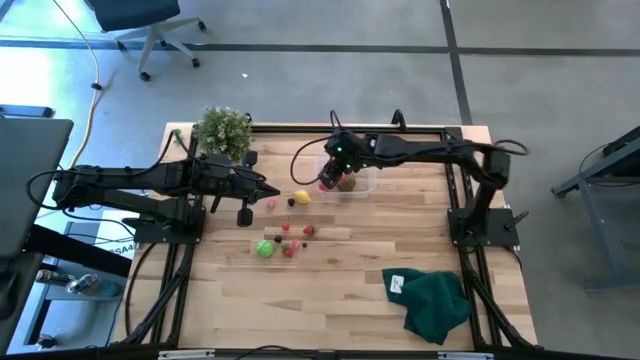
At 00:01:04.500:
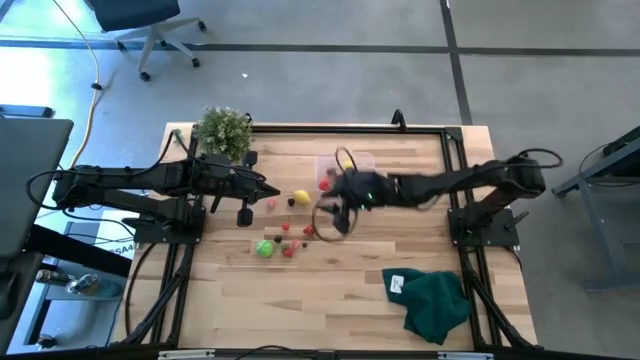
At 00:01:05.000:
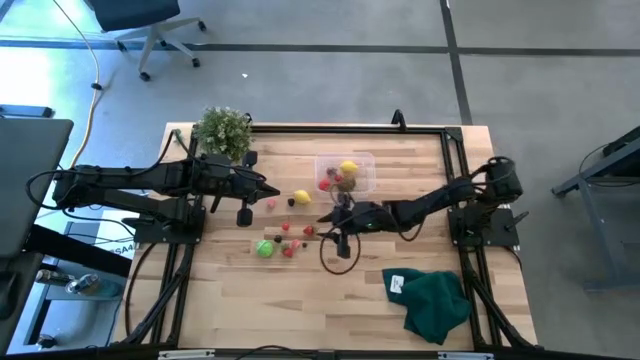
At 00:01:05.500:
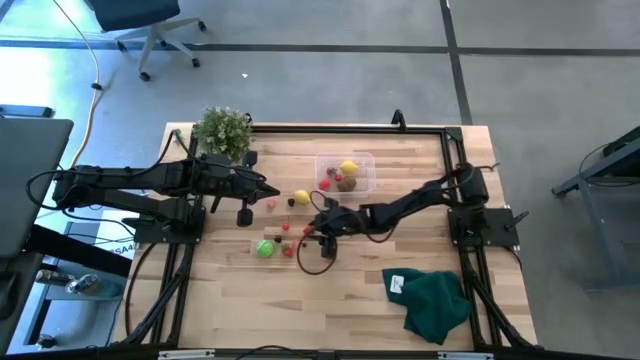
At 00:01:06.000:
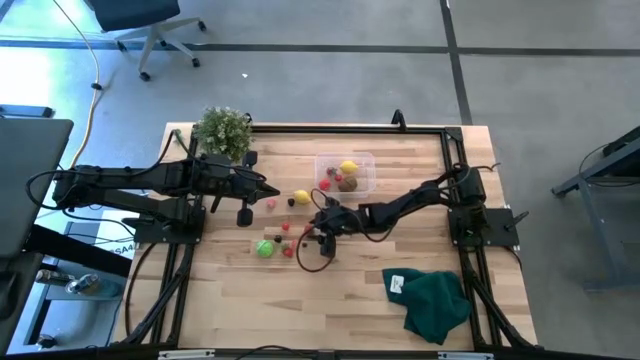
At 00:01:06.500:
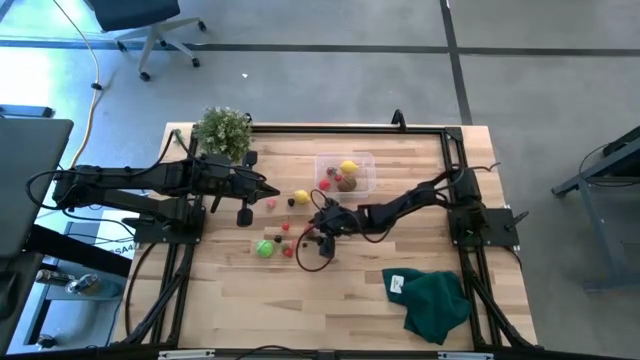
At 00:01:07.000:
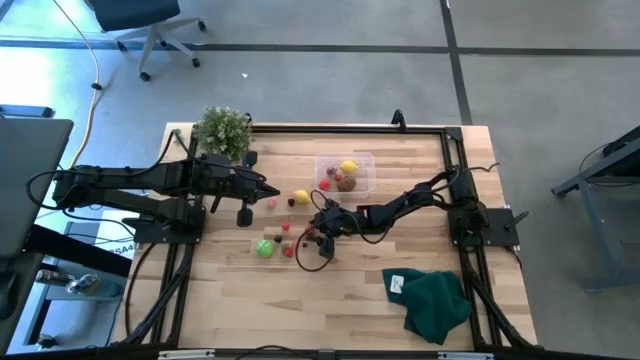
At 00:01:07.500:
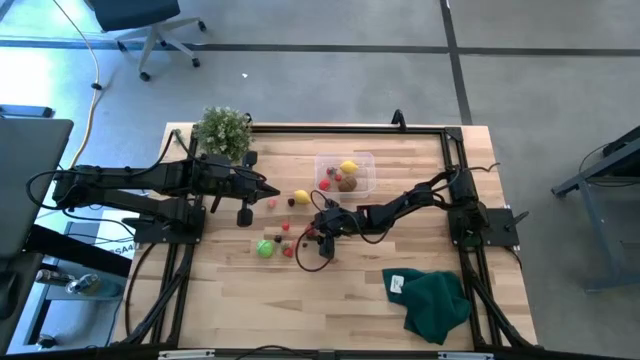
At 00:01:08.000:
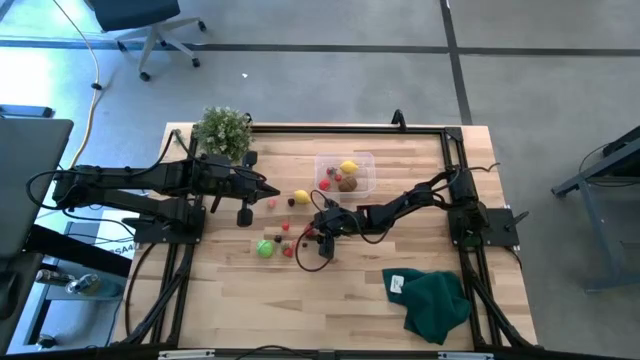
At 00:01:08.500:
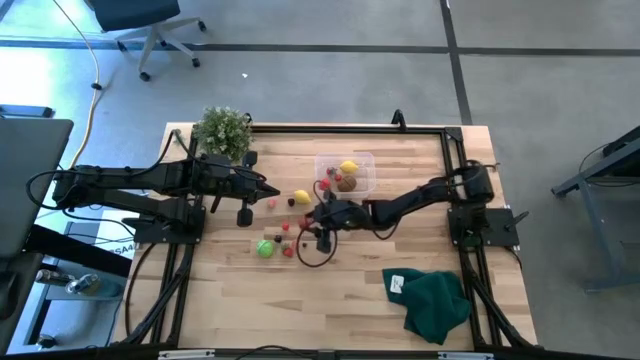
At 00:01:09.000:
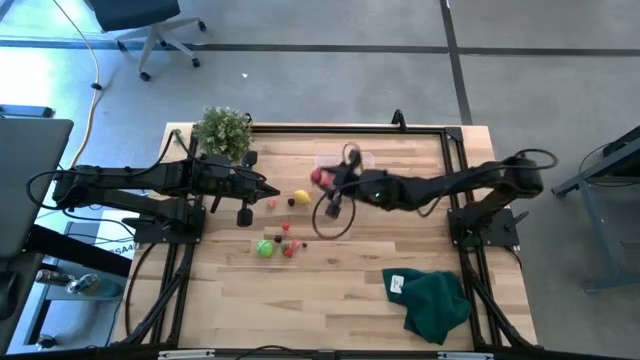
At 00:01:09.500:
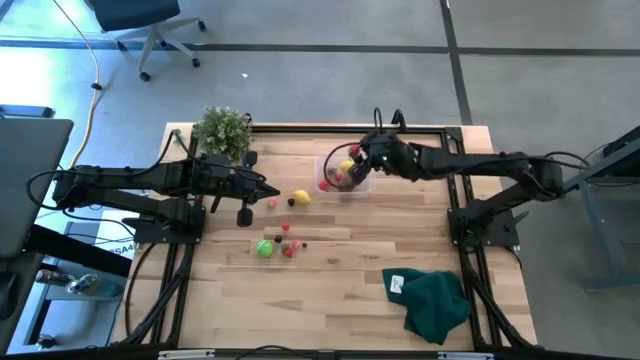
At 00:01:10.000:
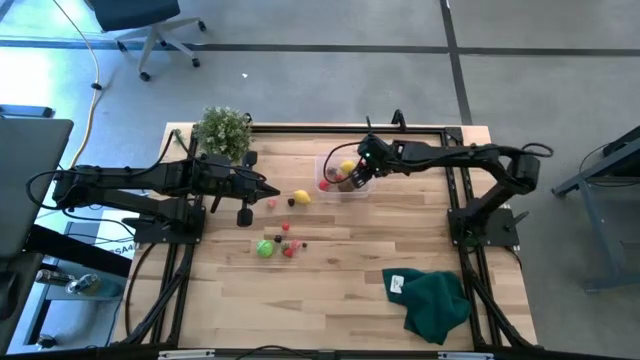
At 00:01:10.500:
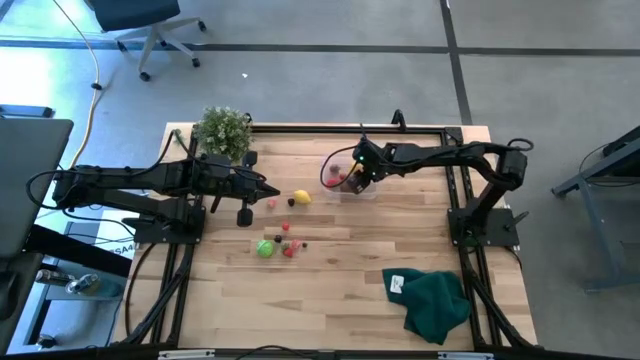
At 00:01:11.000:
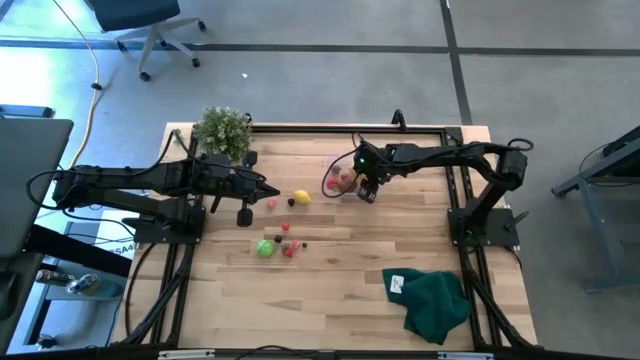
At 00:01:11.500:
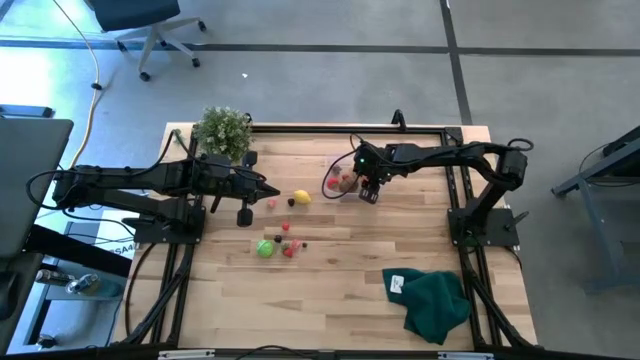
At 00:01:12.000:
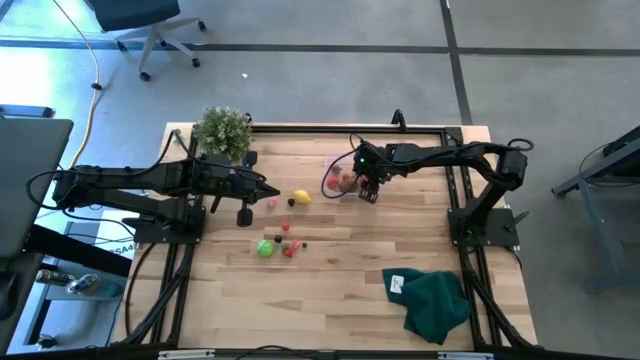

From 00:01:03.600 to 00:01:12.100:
Task: Pick and placing Produce into tupperware
Put the red strawberry into the transparent bin

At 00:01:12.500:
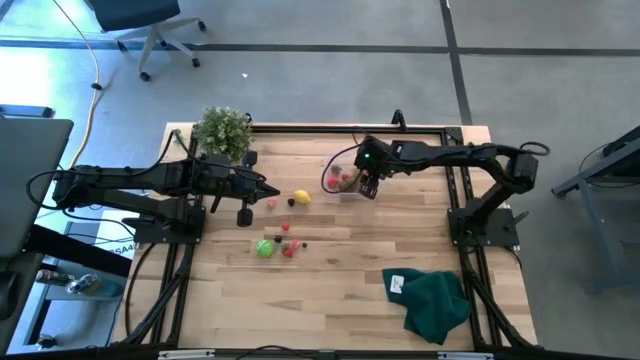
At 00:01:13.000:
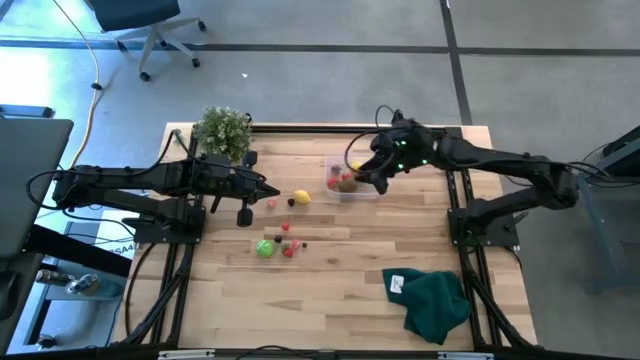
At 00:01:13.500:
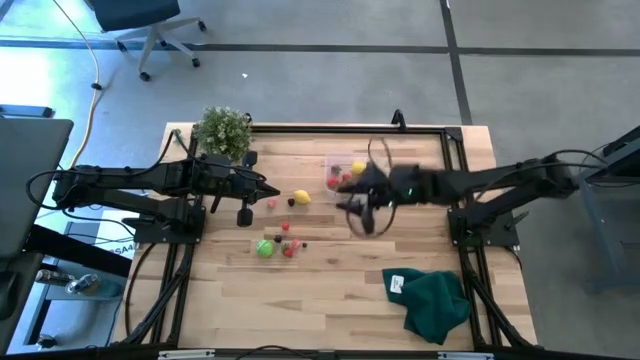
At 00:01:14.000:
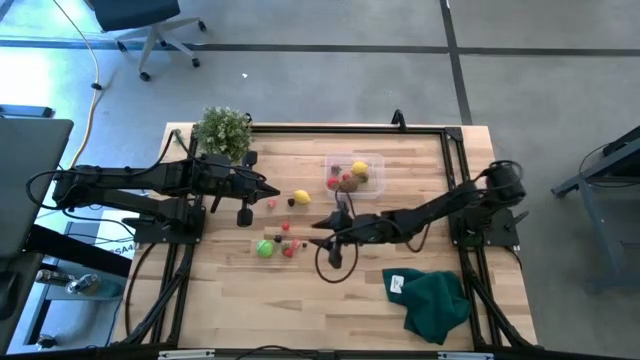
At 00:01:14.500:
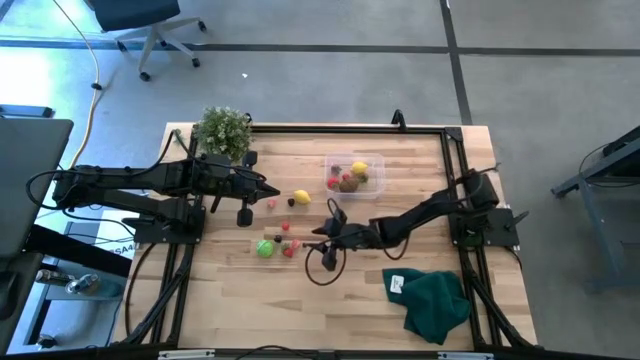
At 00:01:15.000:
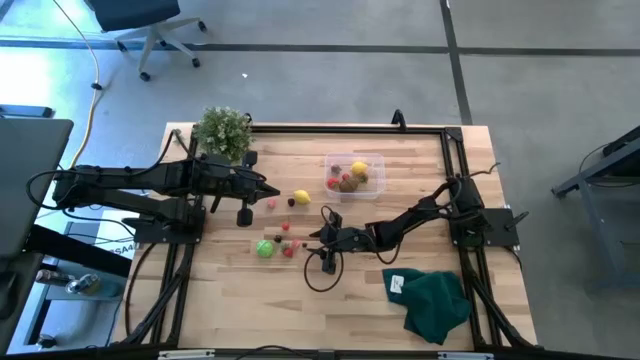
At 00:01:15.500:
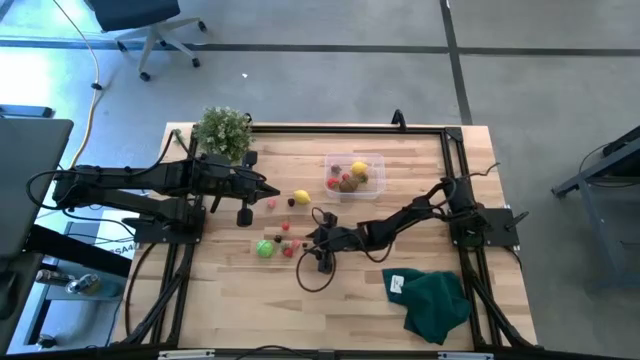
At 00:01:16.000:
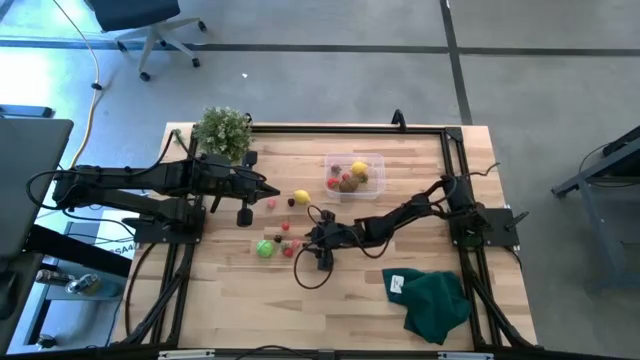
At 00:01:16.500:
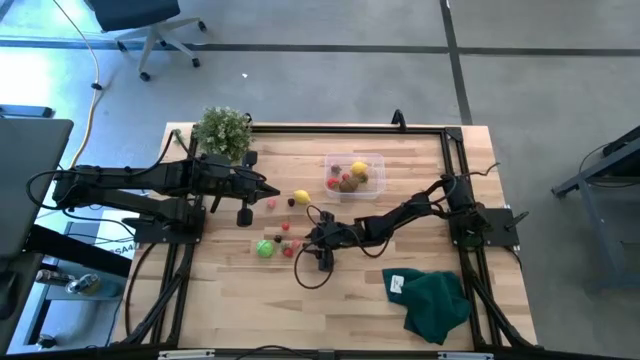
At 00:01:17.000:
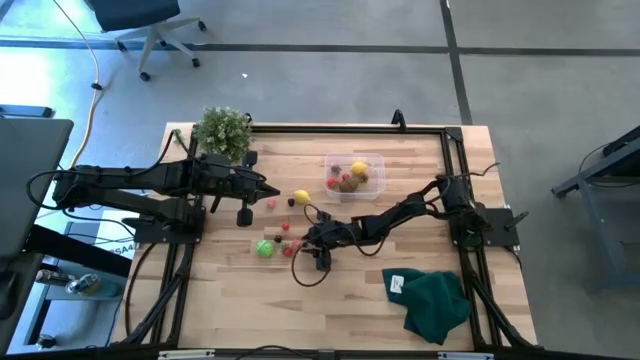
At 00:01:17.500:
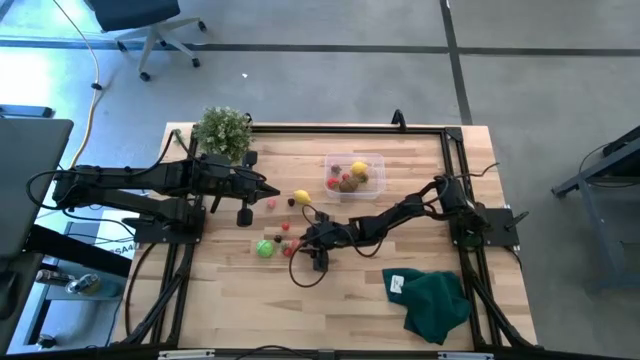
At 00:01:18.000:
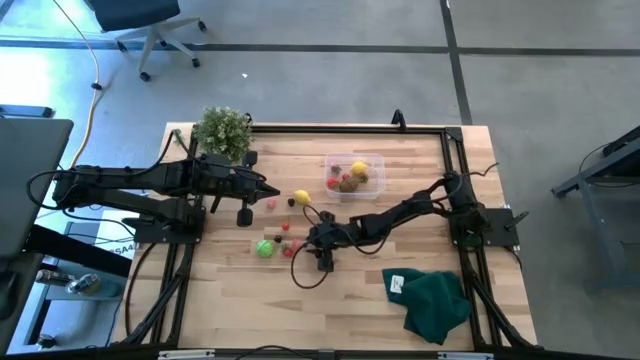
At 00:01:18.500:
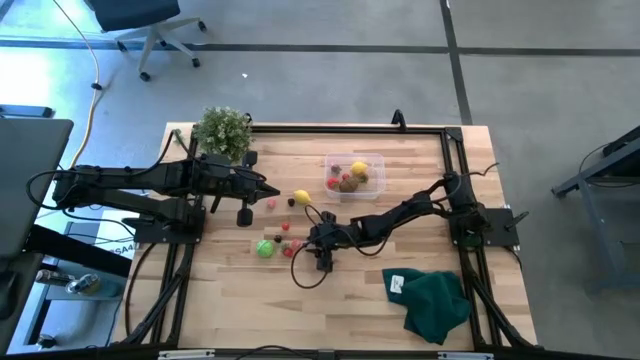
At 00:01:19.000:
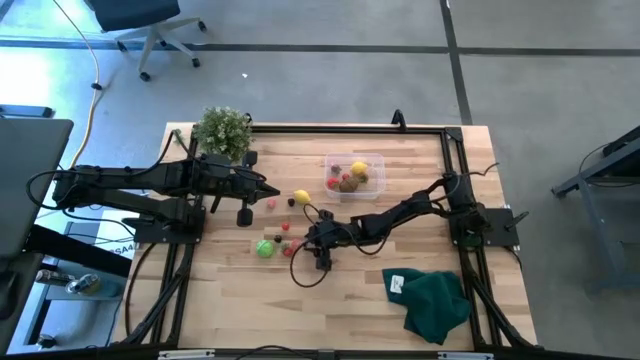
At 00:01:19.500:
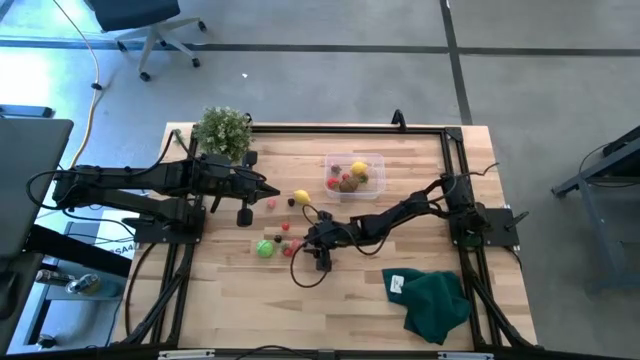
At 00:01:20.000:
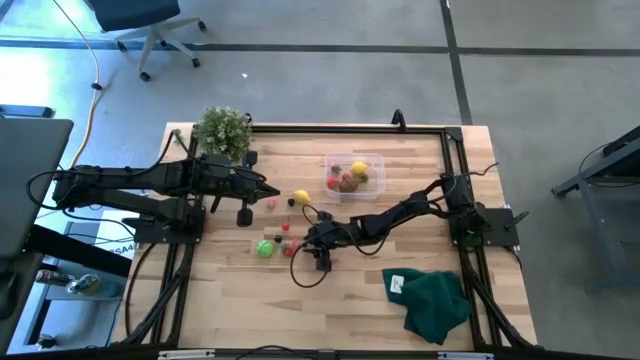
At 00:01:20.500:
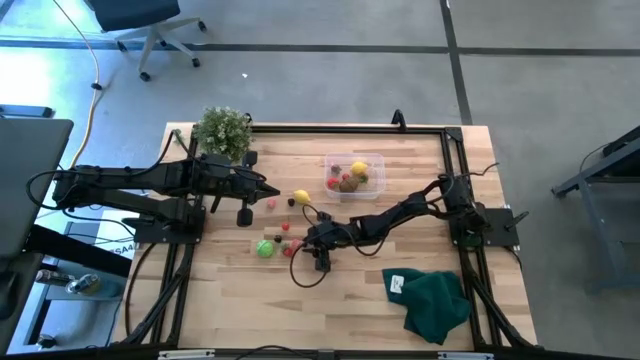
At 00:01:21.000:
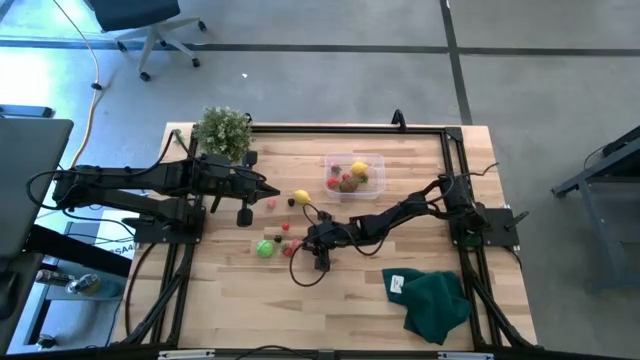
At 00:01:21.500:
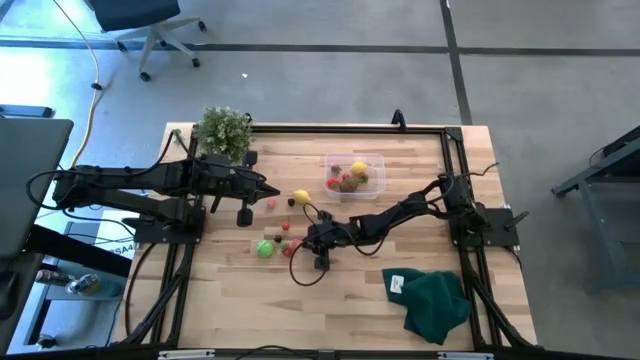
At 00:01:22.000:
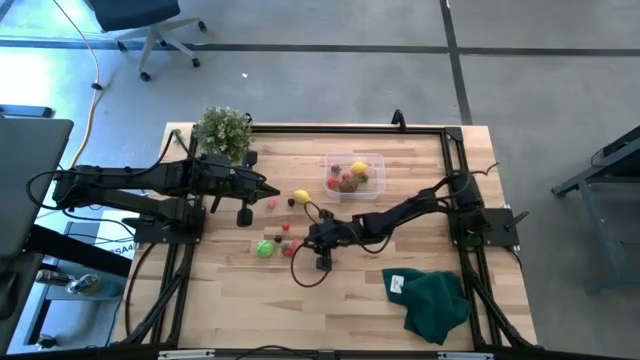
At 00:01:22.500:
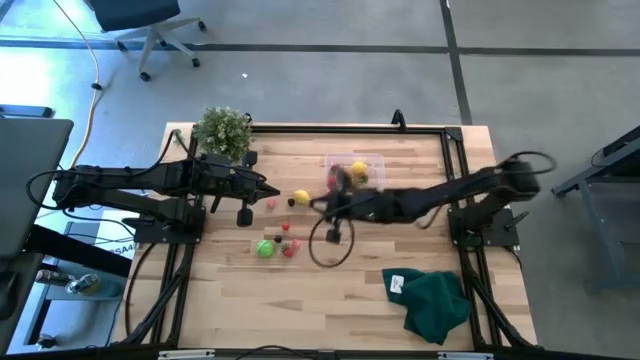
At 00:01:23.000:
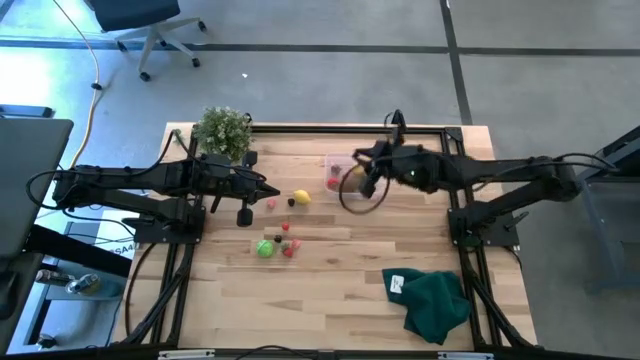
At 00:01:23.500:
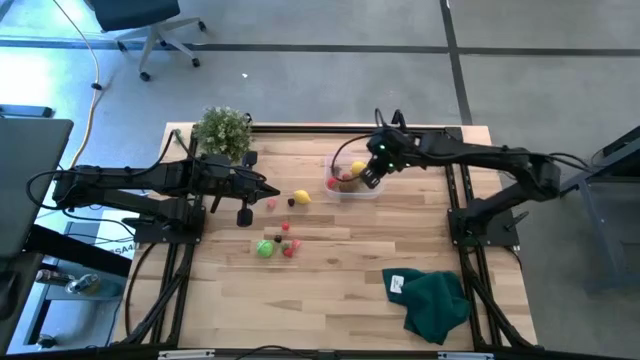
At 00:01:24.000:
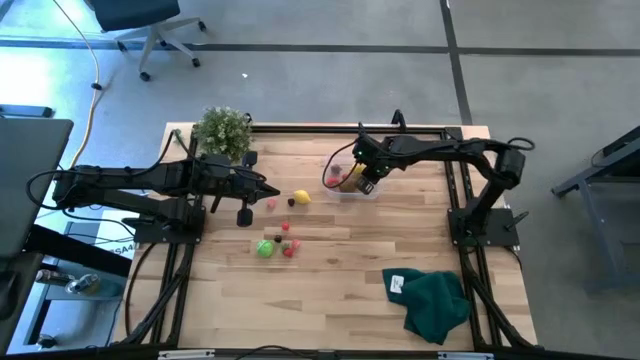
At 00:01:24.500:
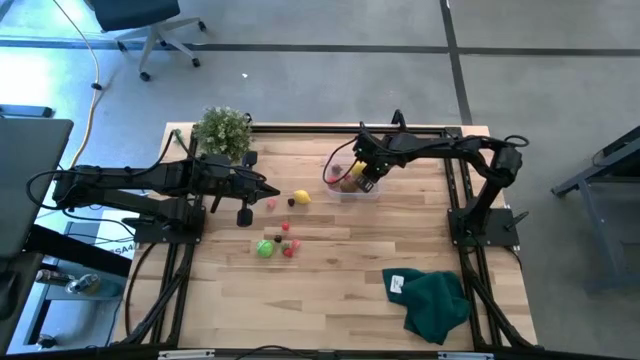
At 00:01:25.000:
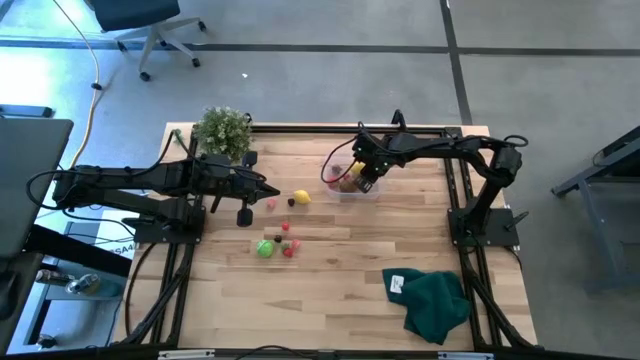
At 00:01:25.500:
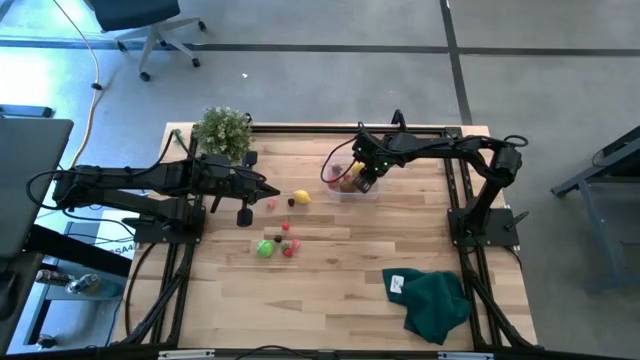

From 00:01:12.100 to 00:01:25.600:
Put the blueberry into the transparent bin
